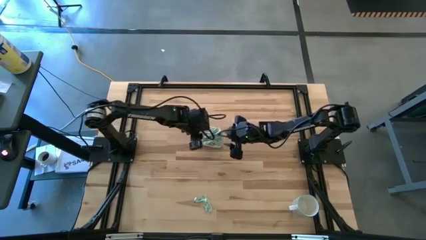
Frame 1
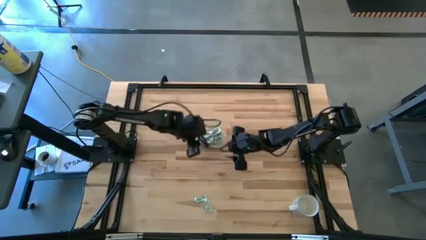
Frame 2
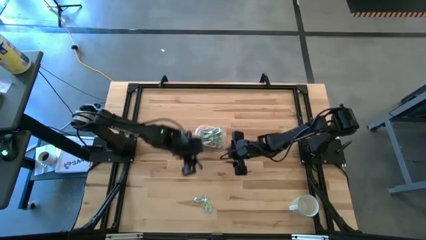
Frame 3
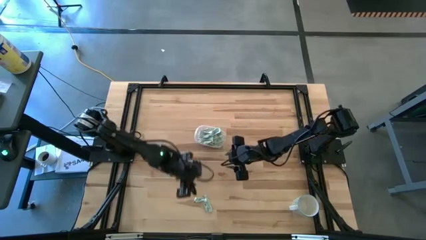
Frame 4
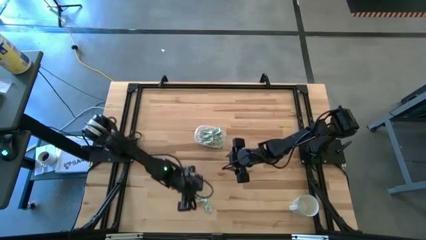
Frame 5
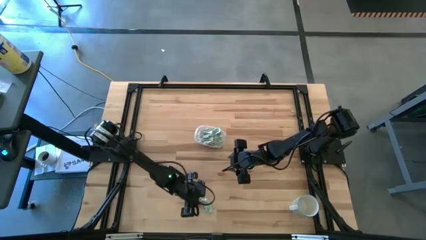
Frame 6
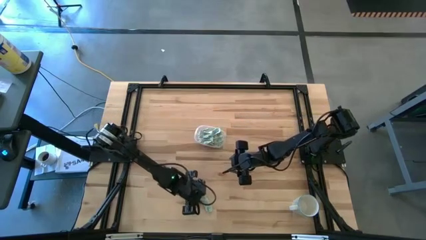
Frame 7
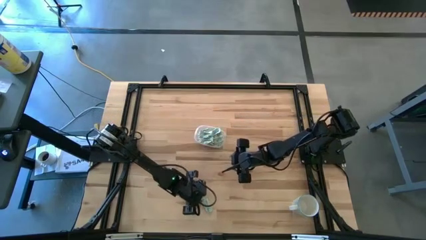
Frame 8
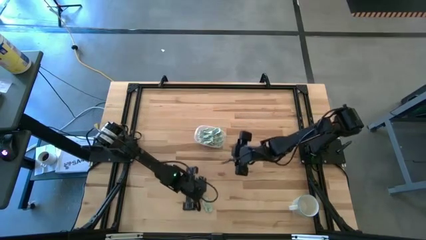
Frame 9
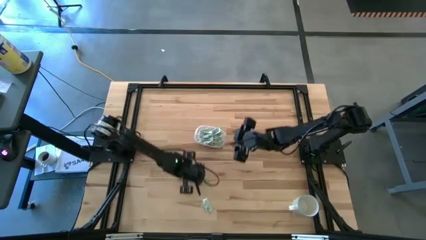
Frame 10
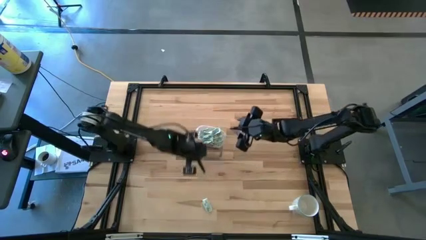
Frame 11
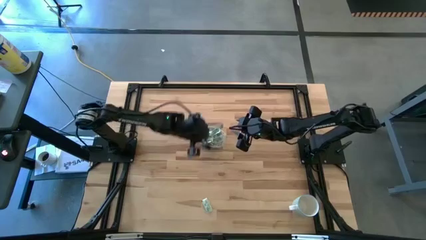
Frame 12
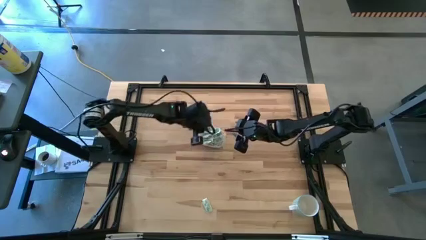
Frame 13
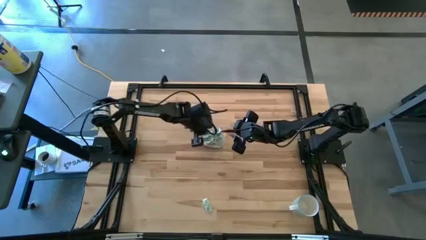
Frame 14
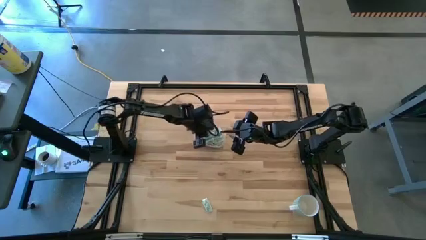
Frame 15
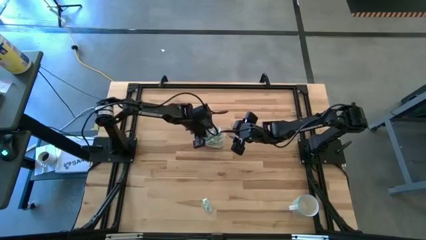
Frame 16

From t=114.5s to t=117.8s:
Task: Pick and place Stevia / Truvia into bins
Put the stevia packet into the transparent container

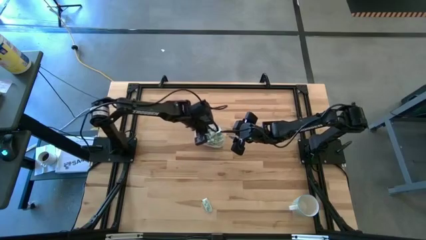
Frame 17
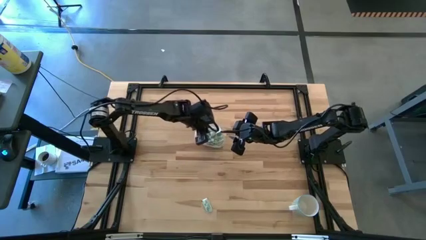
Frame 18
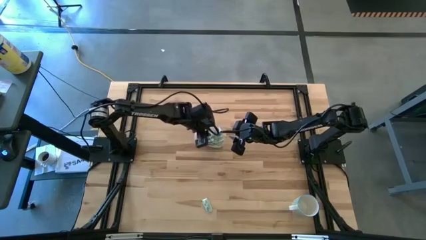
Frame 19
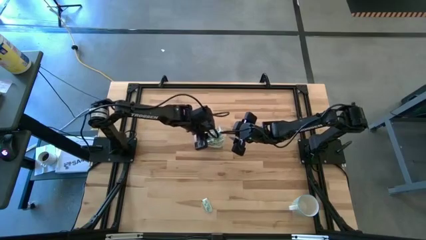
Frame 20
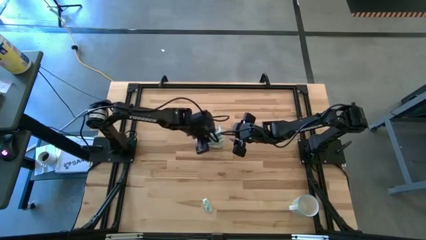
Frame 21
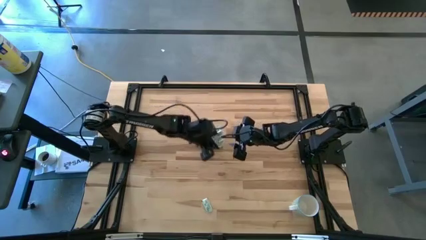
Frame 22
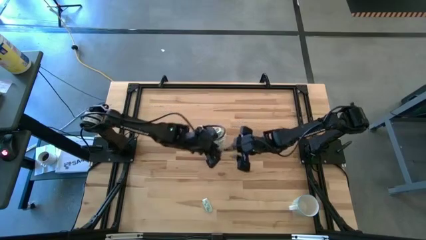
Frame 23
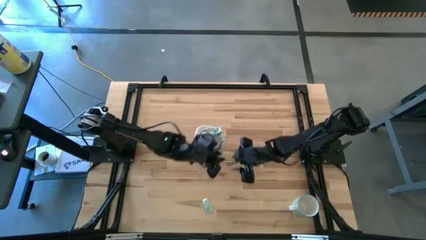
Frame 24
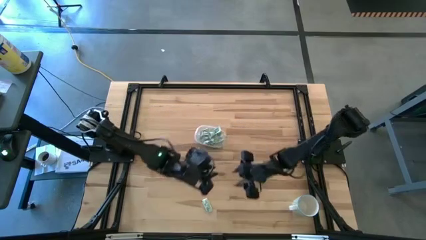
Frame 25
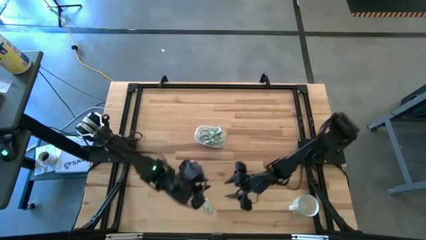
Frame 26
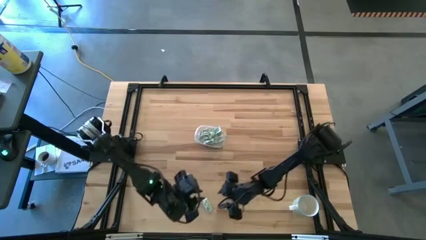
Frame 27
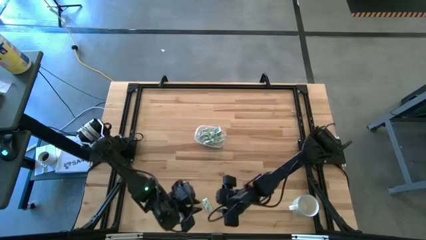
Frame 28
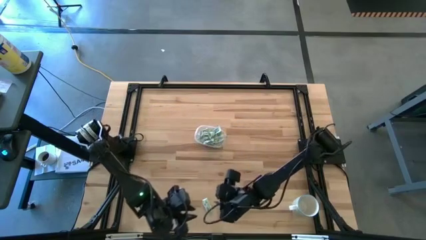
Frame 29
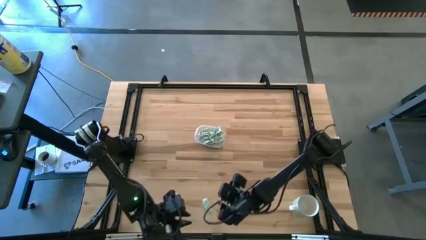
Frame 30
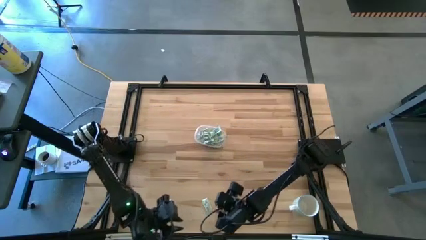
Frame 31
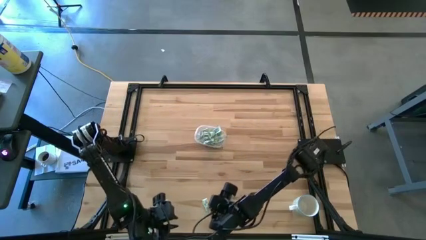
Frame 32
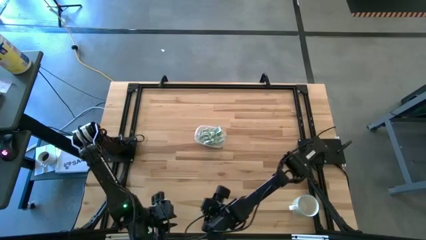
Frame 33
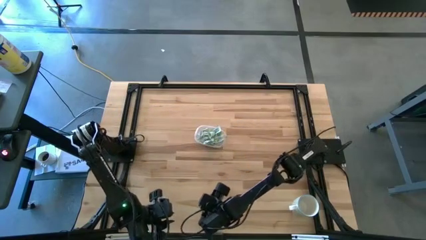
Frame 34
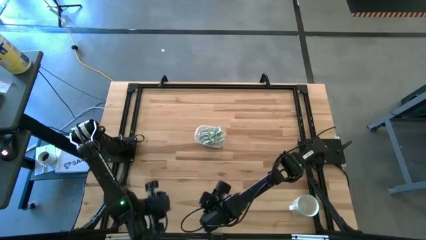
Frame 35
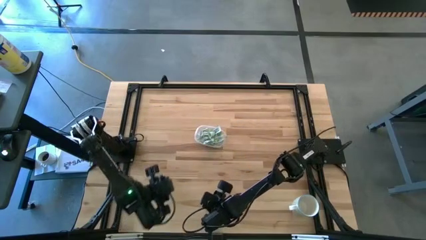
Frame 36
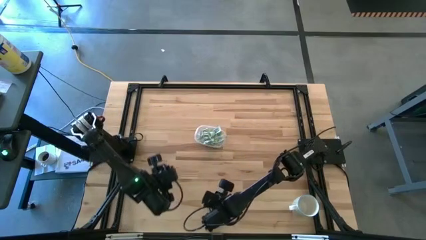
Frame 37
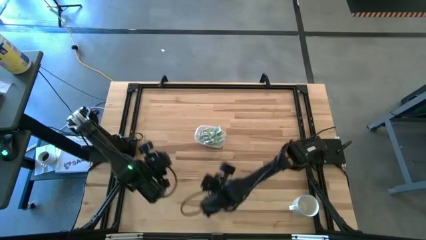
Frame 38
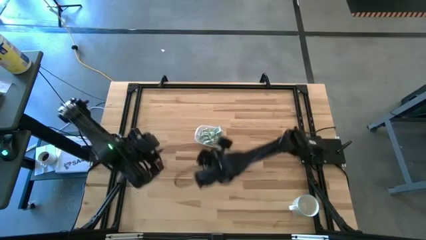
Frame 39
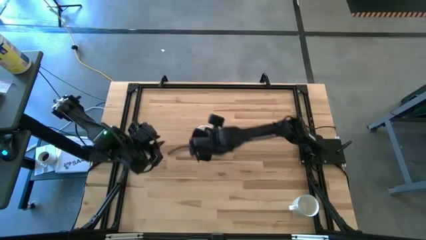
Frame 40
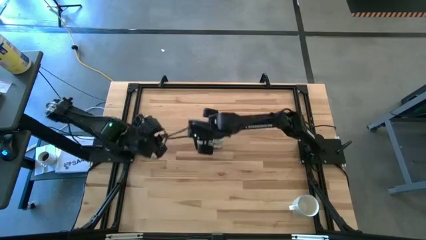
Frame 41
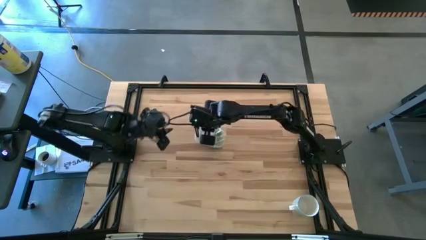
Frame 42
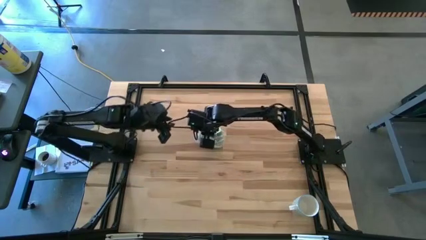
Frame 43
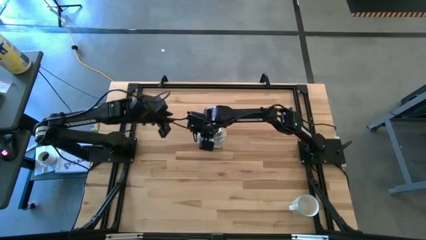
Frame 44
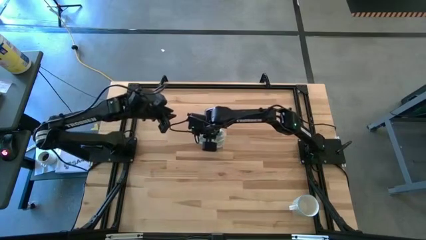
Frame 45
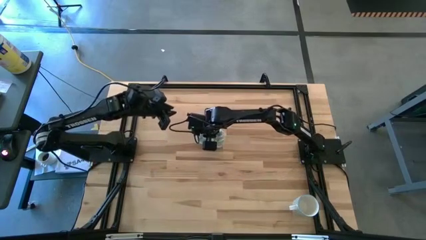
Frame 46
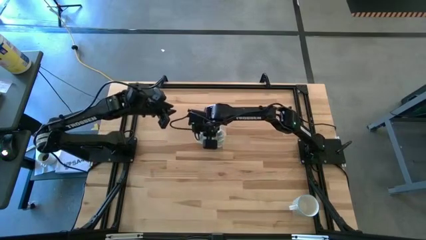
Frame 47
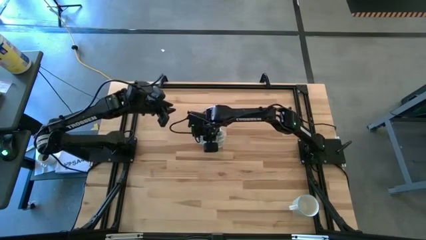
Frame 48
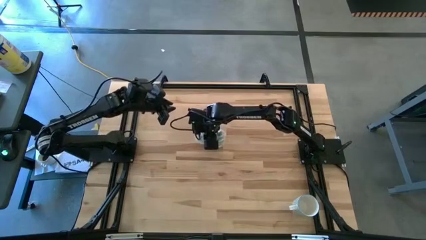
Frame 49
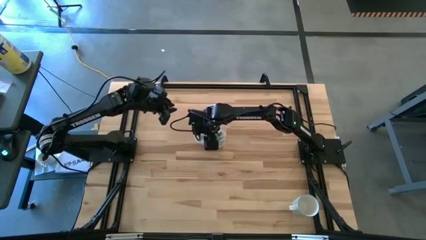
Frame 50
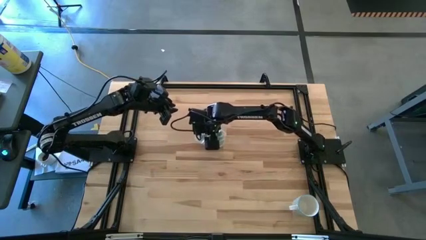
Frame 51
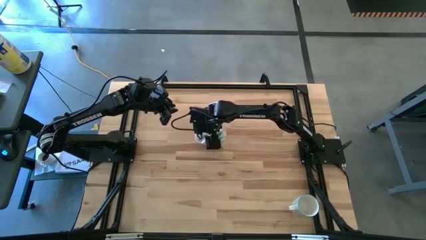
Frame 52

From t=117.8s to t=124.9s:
Put the stevia packet into the transparent container

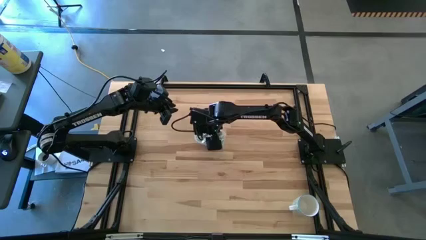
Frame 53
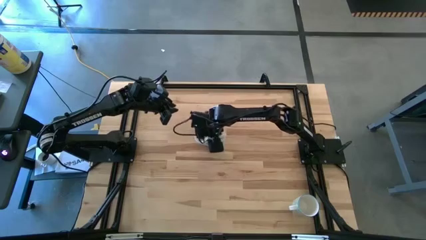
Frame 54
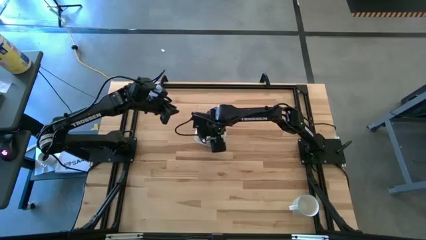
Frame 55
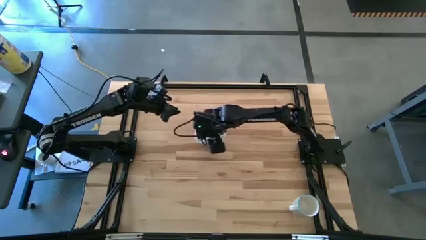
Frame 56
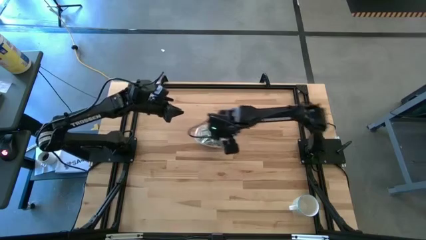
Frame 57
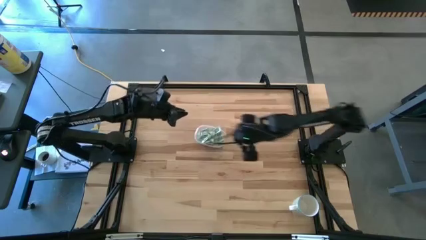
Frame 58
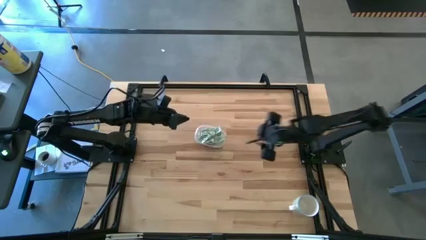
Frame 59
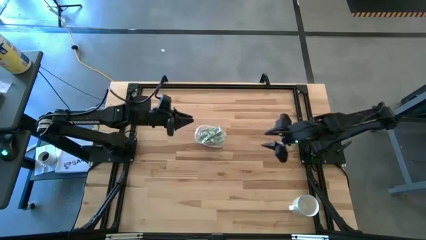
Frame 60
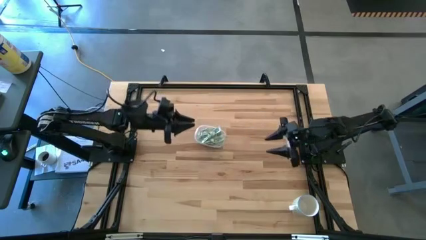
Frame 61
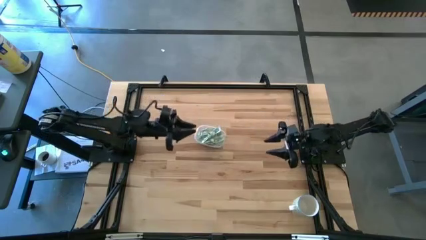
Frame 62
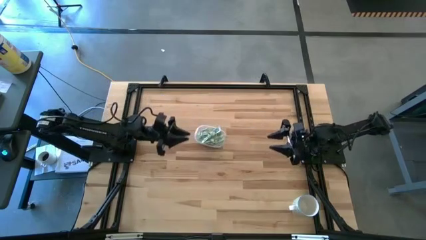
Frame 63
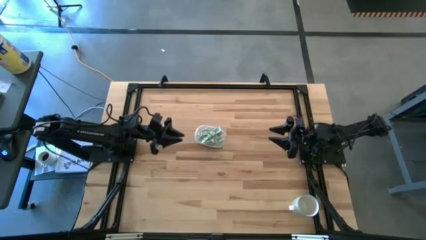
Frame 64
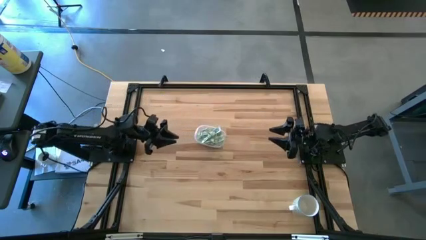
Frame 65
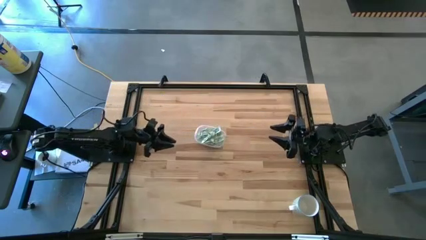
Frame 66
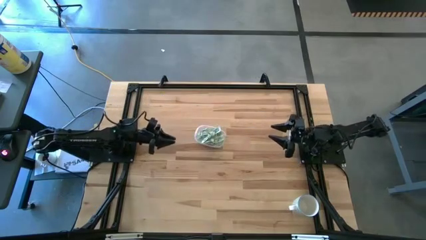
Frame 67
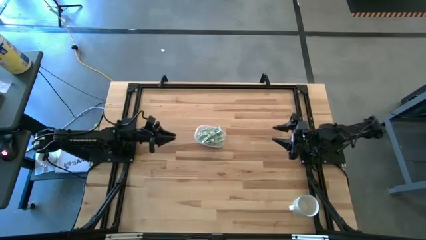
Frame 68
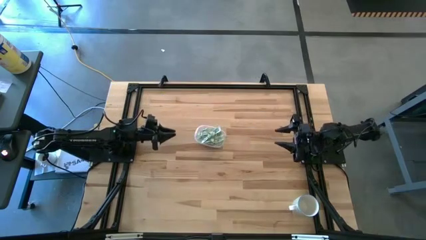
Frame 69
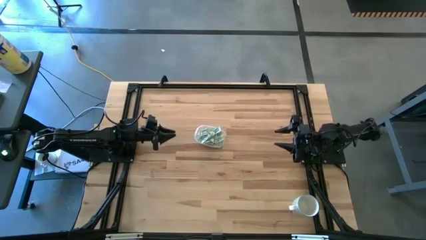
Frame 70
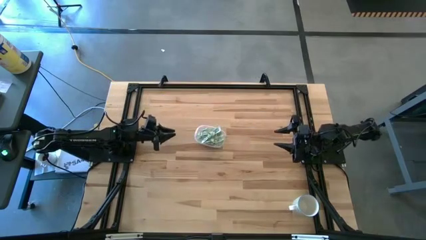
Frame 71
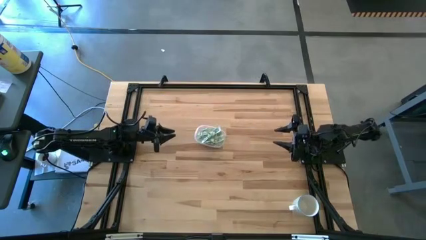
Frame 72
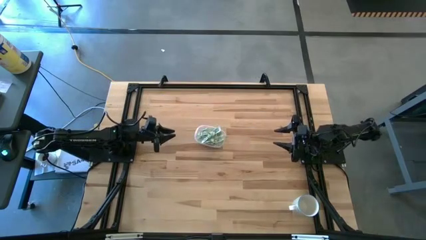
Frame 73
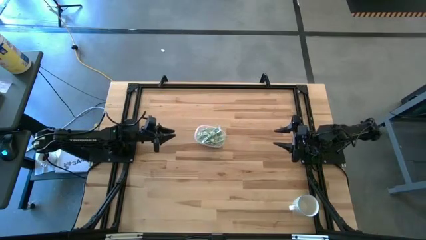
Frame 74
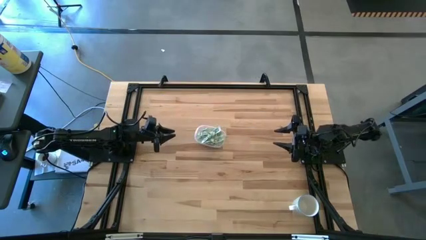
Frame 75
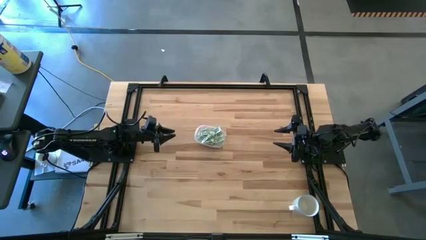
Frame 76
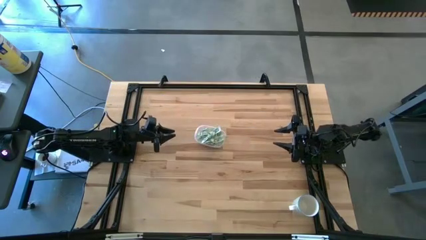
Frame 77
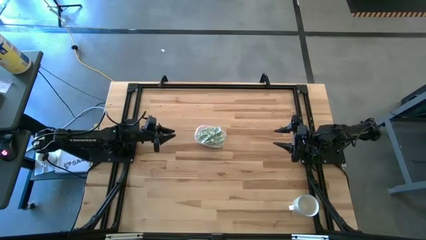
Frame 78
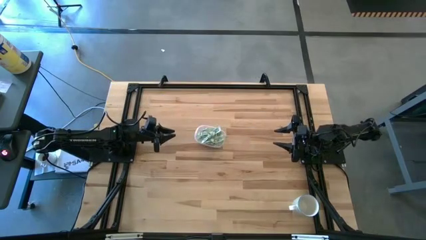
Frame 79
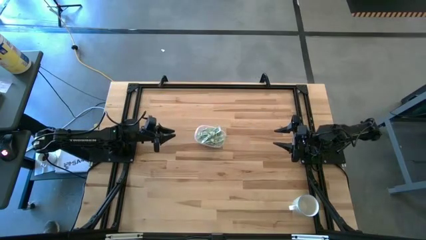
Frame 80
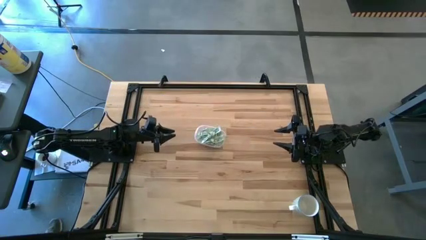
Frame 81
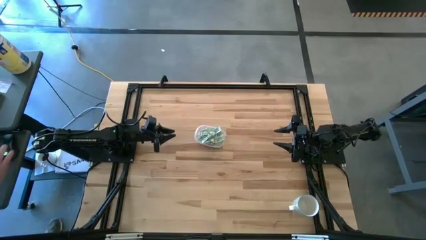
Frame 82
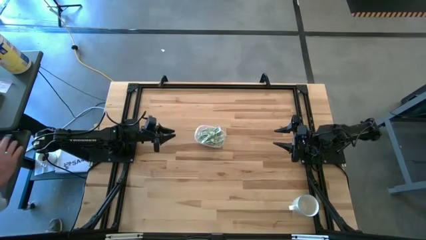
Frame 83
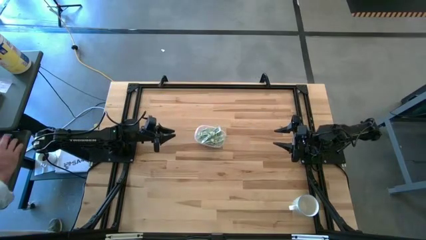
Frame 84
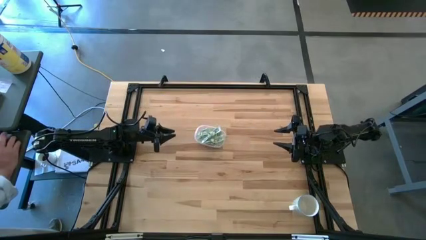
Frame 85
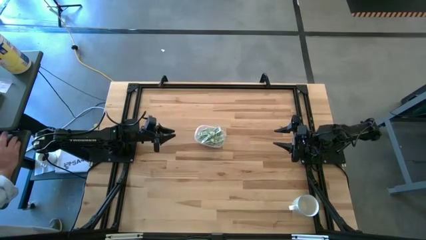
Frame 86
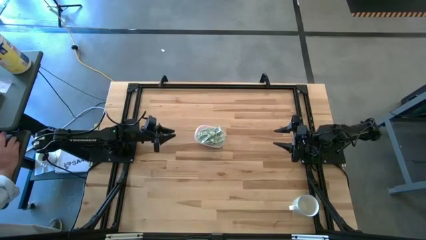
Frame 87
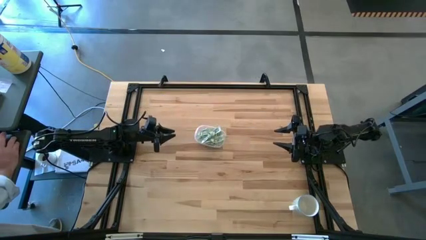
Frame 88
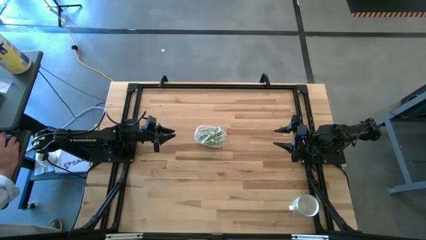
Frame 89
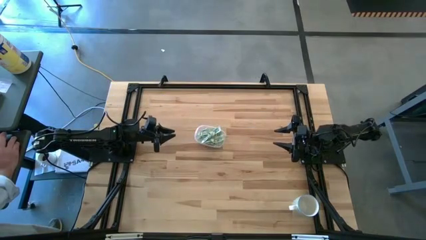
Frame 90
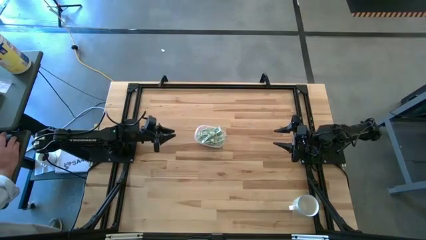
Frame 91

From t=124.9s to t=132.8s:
Return to Home Position
